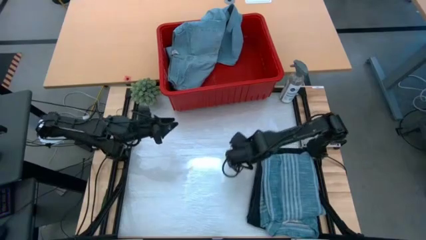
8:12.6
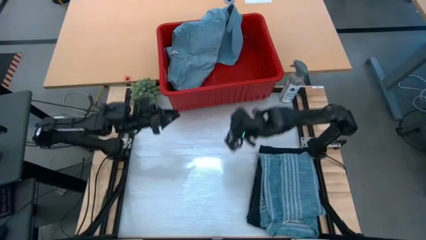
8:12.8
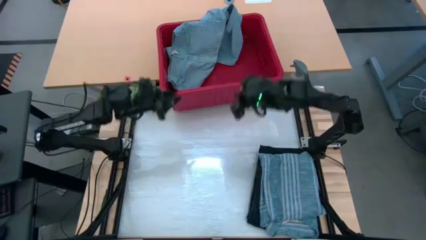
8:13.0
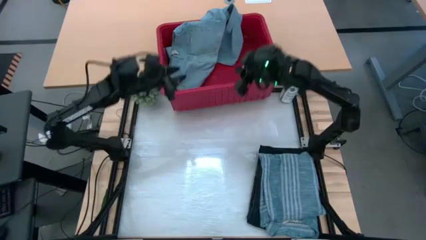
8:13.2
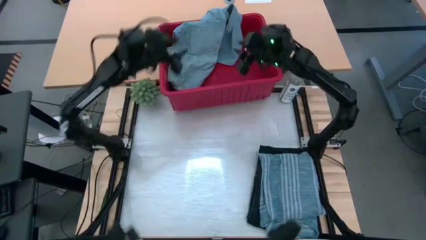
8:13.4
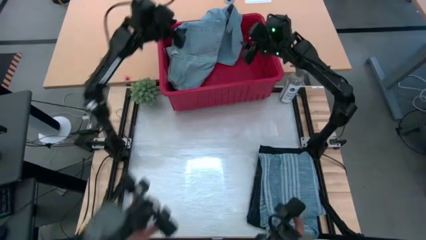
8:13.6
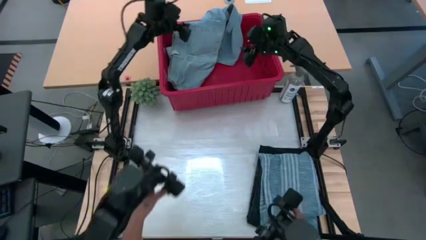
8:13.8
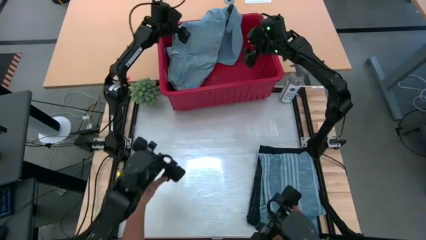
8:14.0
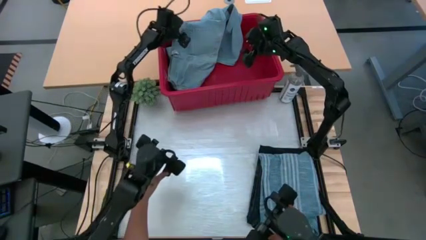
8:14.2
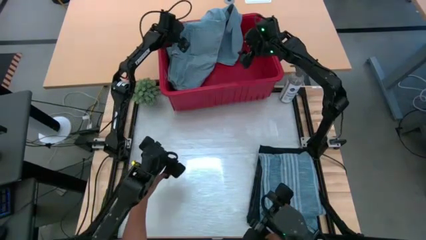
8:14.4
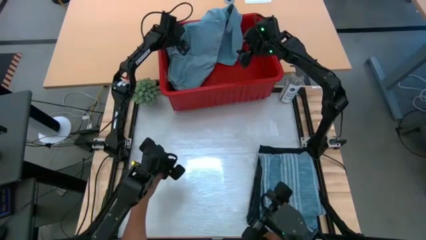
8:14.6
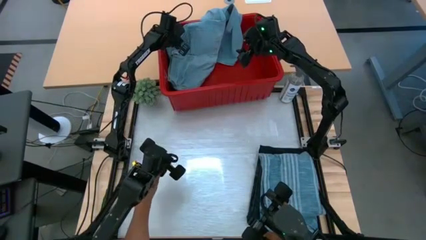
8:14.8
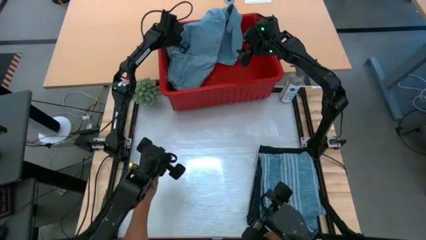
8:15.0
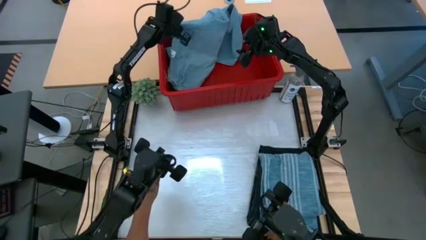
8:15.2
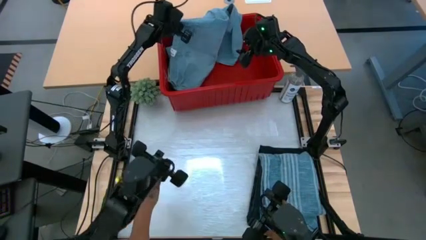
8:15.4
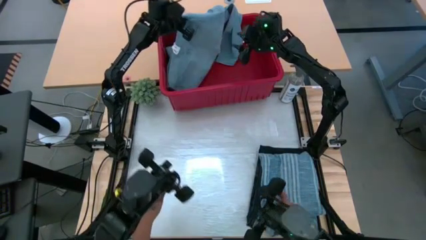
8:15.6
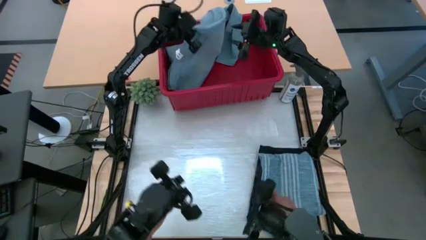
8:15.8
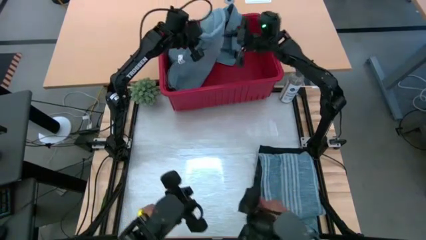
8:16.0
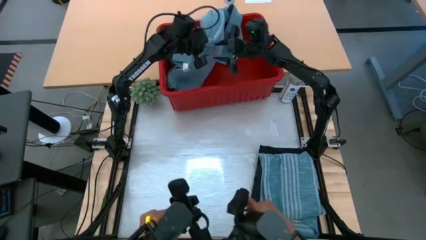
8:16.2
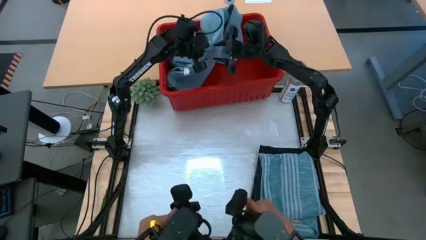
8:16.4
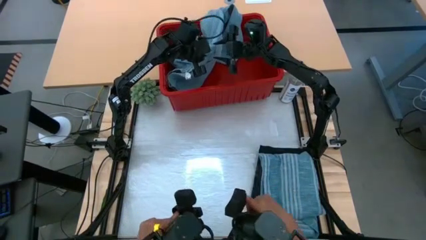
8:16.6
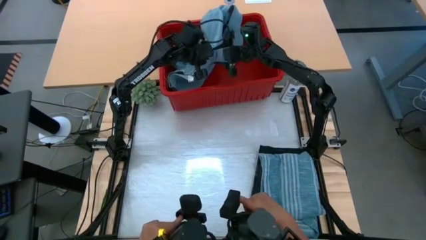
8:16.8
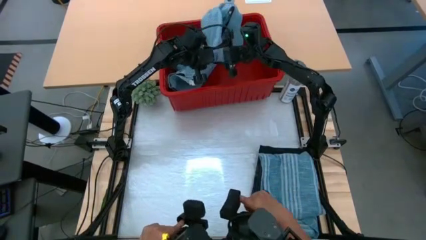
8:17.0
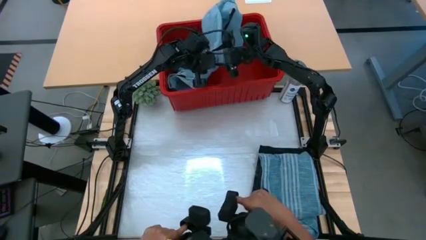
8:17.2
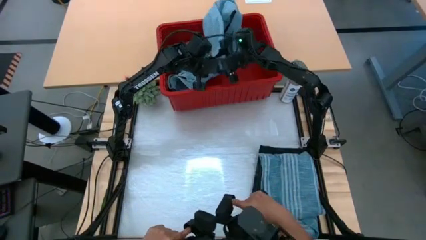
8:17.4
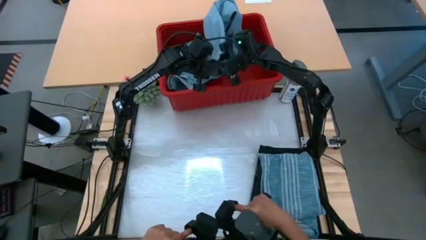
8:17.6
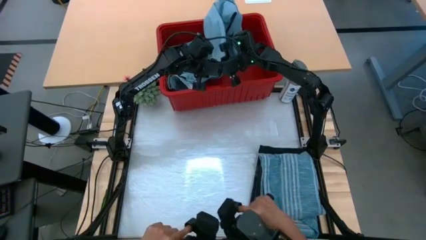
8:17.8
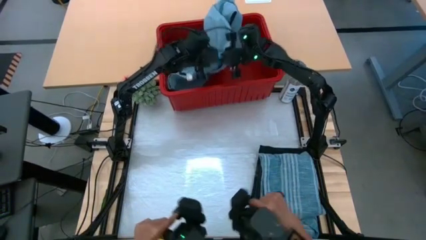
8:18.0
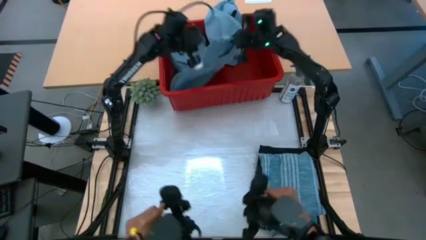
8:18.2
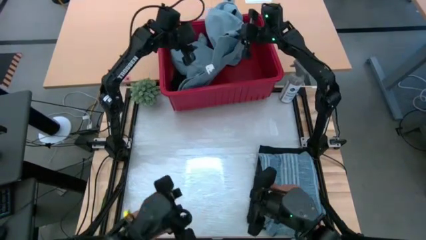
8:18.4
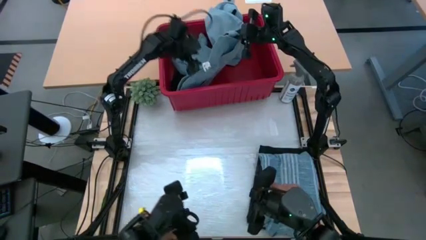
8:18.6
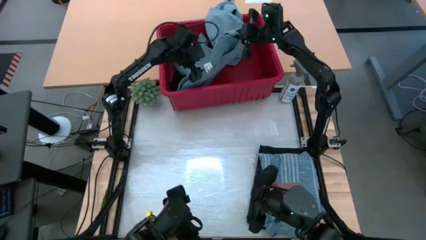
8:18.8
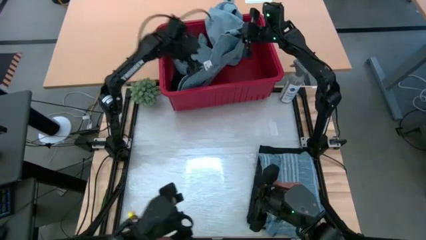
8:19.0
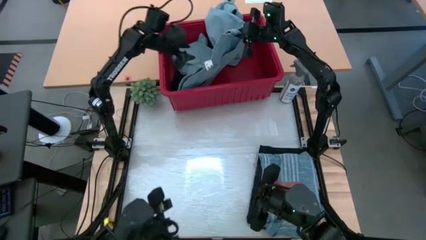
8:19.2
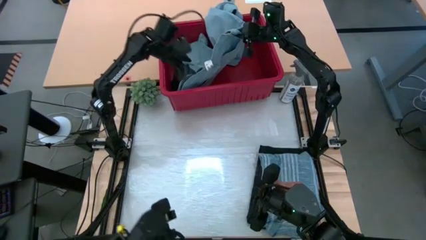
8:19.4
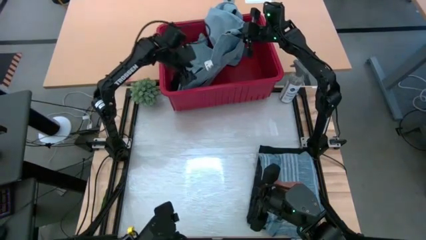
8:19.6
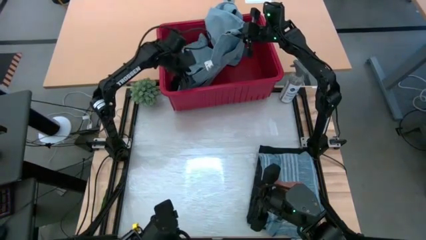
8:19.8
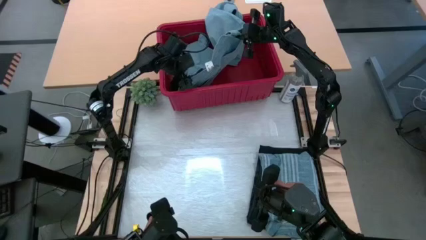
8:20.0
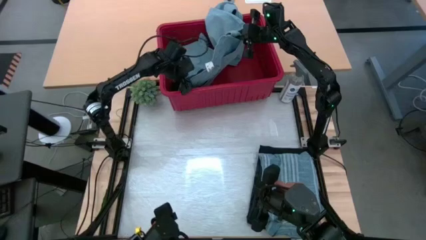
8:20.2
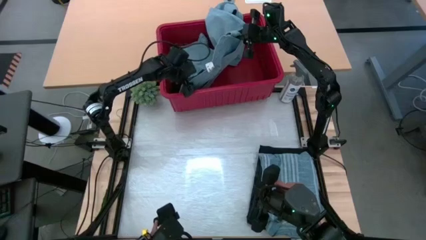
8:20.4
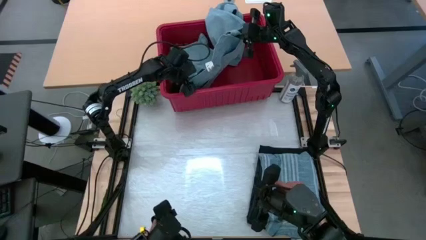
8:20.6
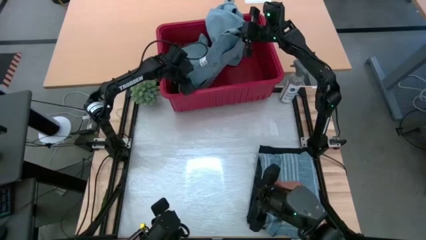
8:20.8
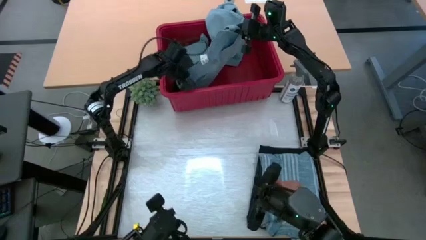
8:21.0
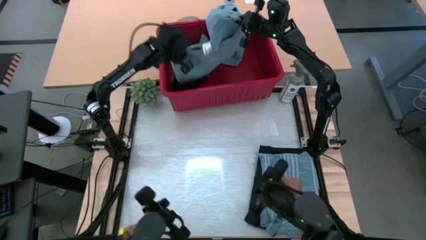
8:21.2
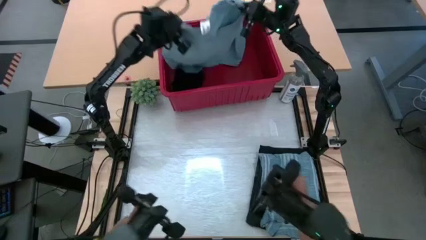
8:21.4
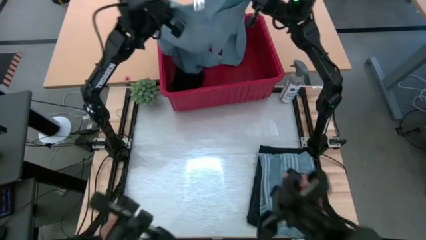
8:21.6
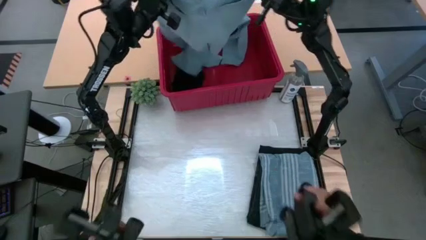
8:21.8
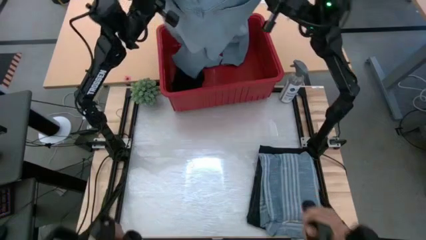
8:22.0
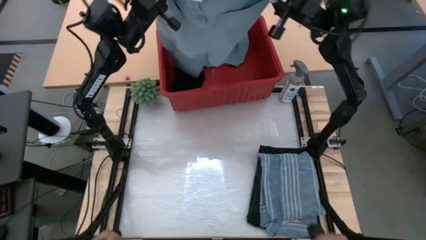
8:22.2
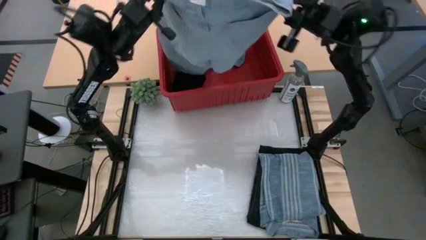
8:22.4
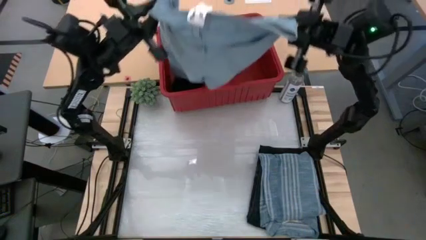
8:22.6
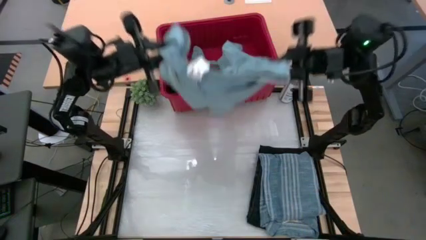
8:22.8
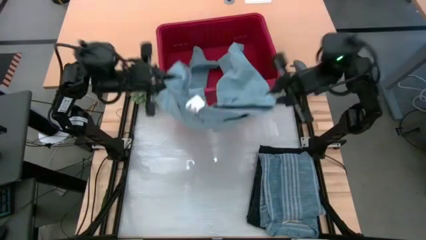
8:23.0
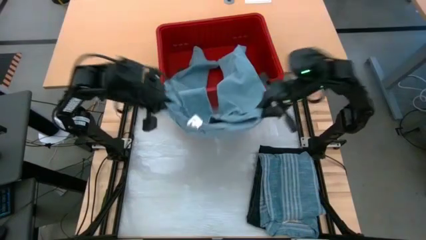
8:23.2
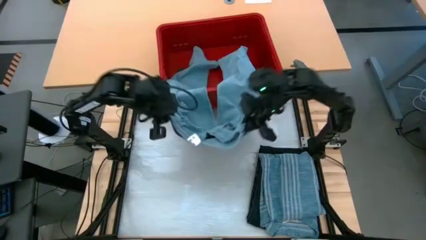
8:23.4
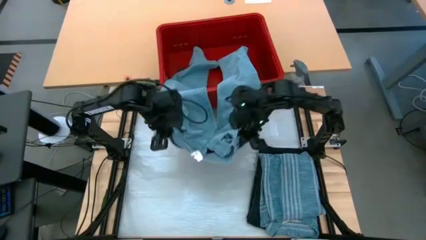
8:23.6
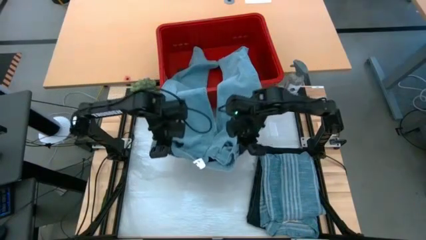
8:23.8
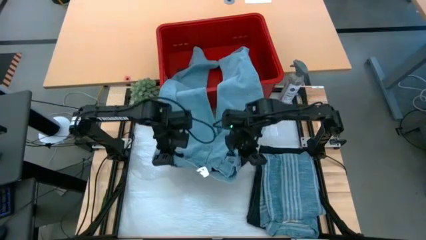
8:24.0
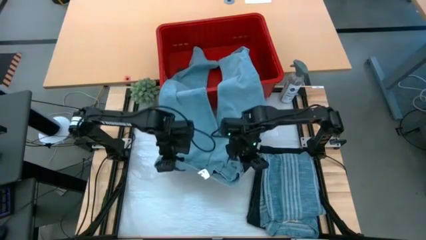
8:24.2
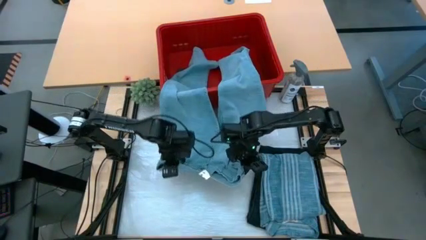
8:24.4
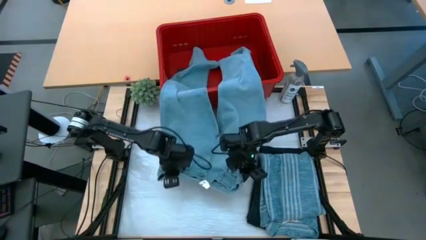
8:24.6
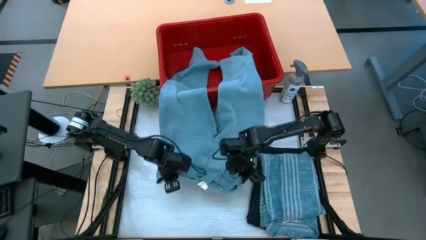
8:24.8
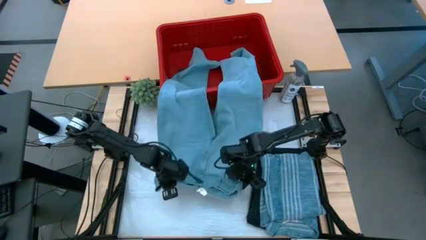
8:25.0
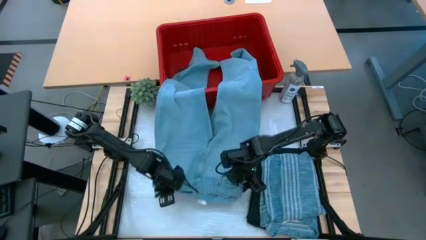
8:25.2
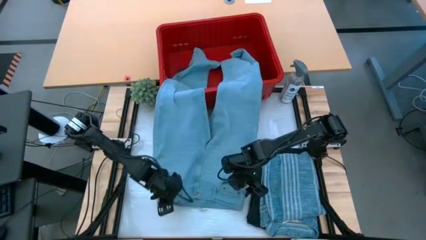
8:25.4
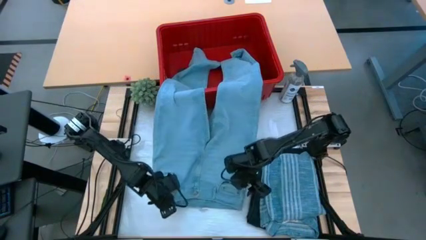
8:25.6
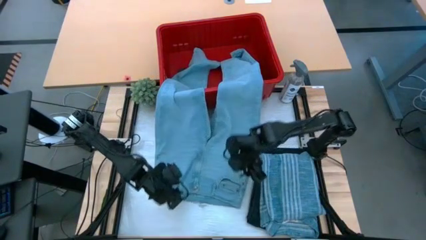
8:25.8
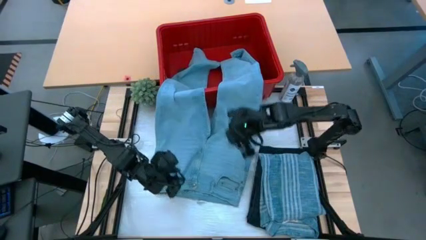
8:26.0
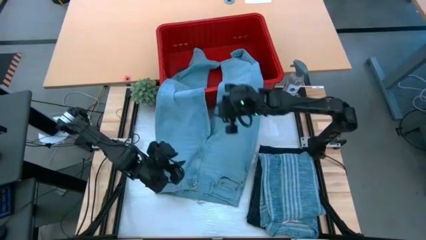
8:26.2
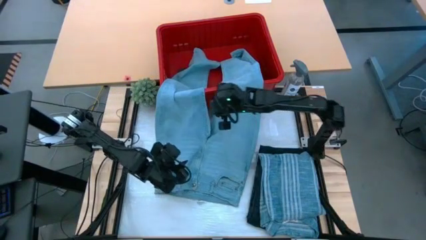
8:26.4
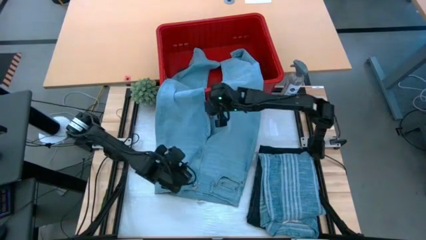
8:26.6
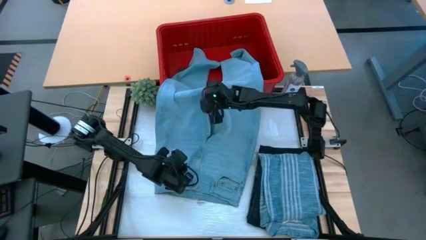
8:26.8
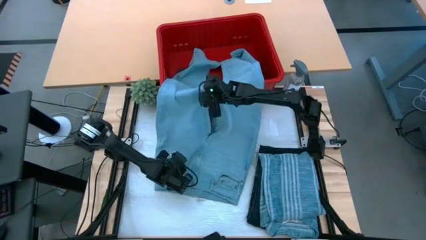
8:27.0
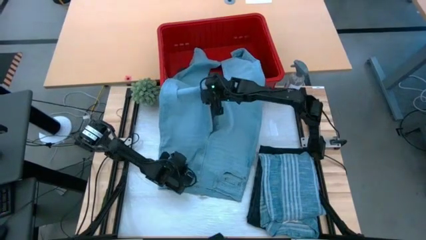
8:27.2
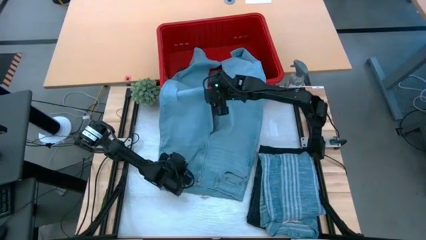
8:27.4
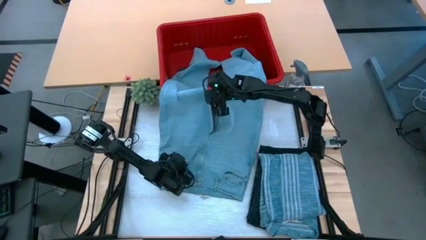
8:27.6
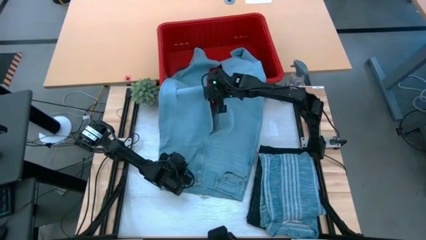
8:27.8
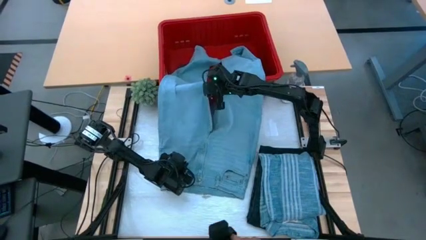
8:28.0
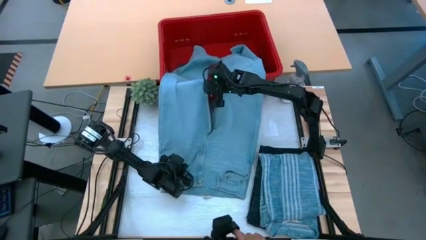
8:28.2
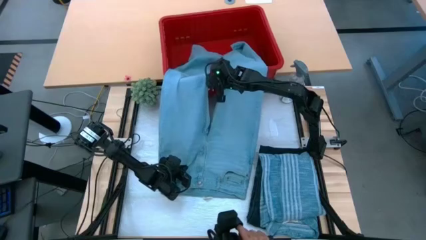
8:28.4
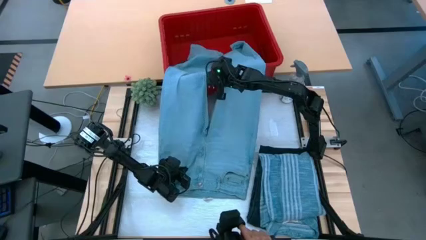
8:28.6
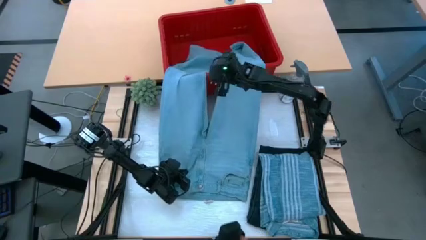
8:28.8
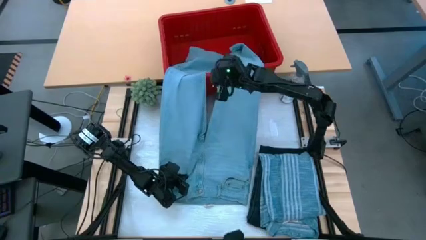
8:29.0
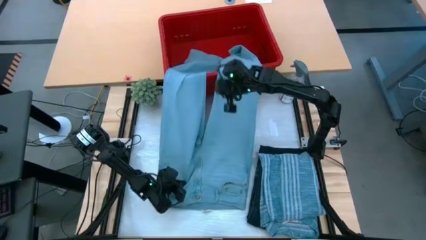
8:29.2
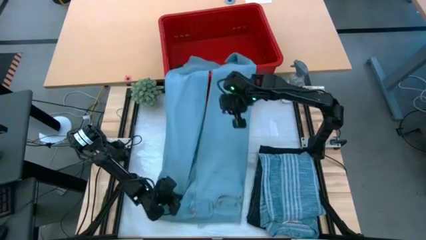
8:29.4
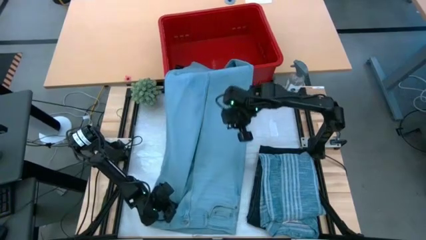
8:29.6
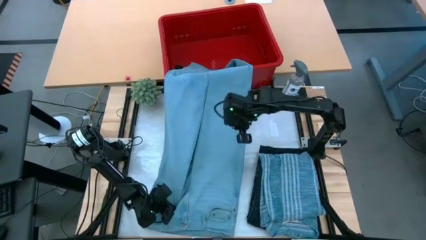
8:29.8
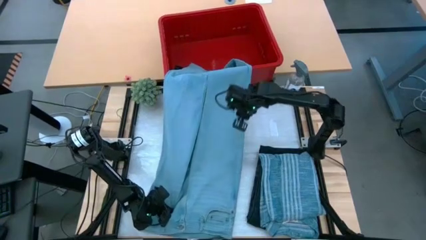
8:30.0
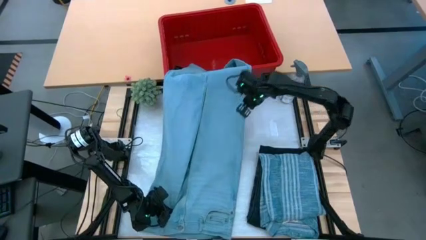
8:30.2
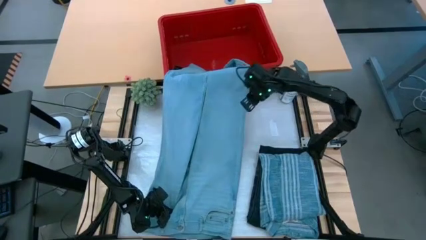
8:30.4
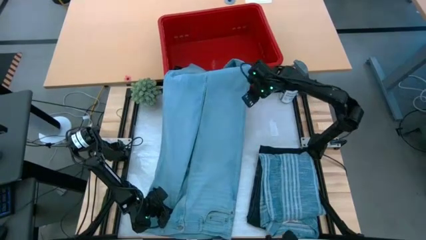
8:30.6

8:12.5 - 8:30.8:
Task: Fold Laundry from Bin
Fold the light blue denim pants
